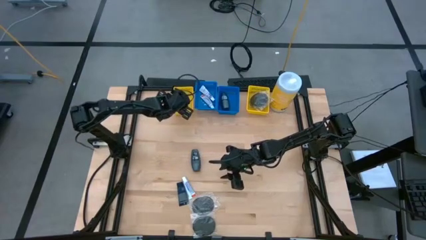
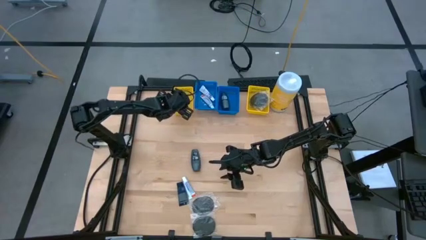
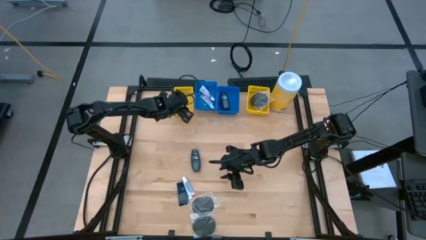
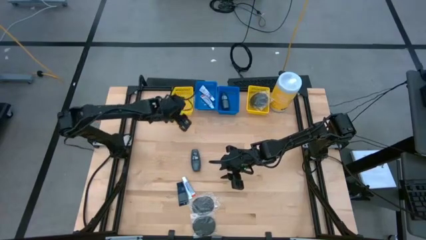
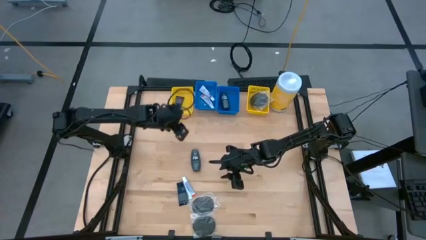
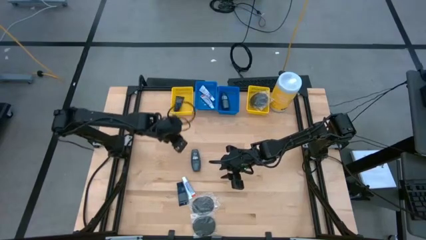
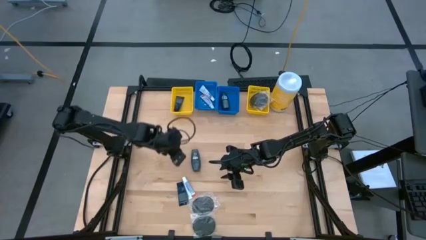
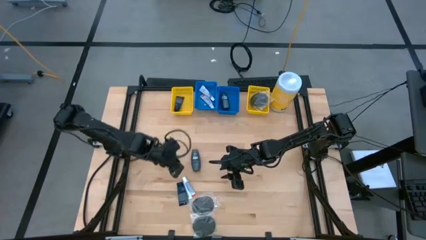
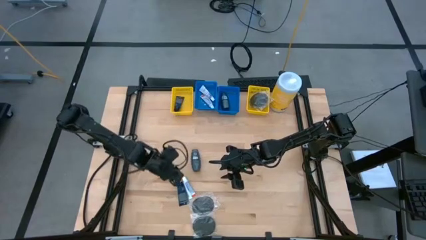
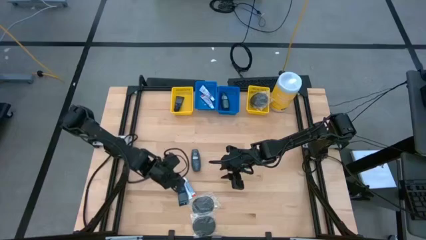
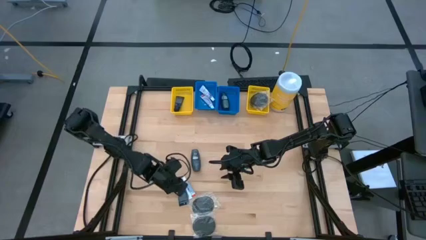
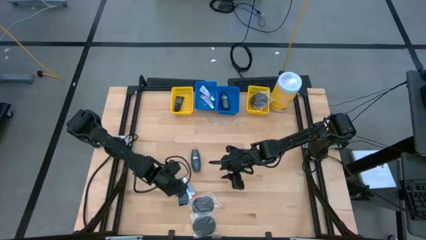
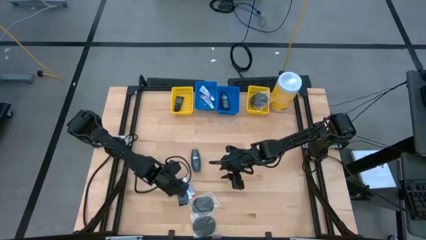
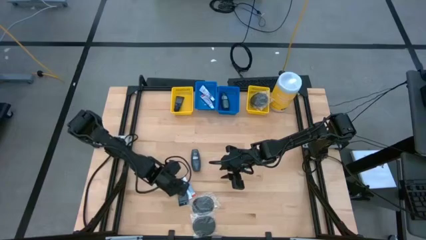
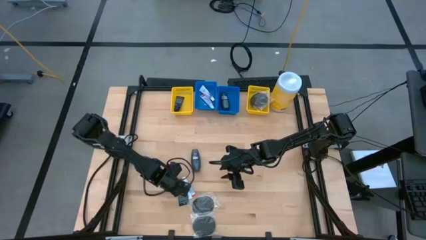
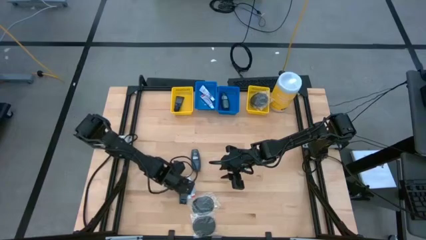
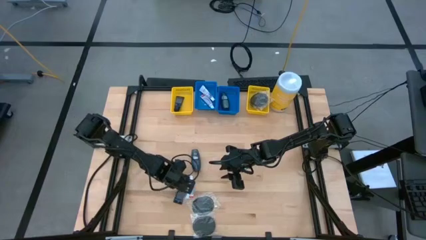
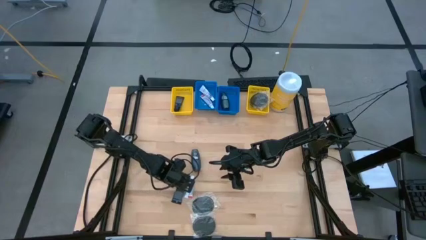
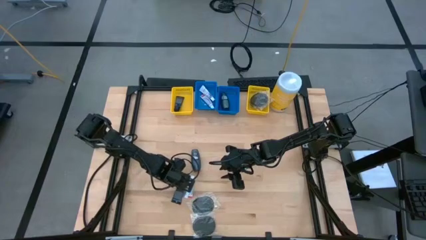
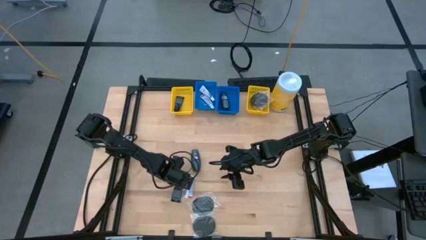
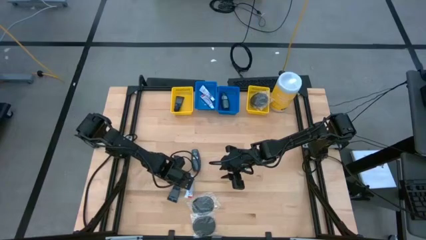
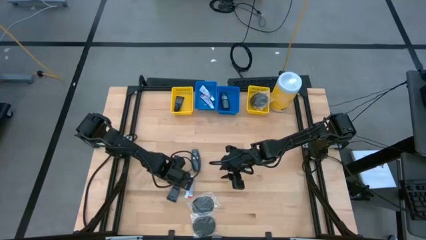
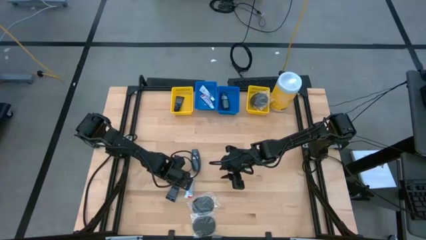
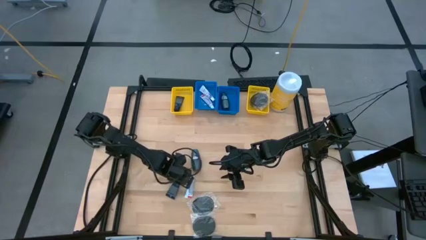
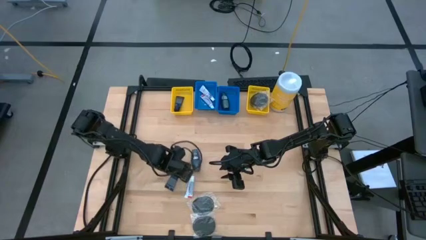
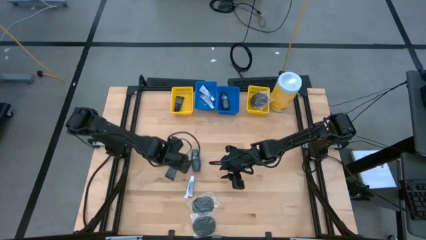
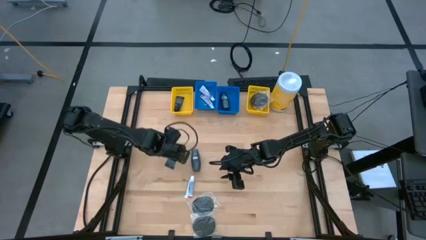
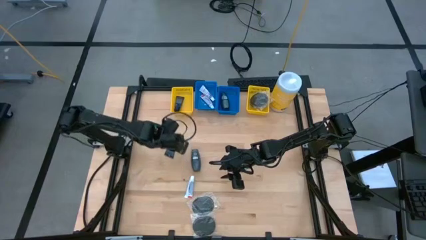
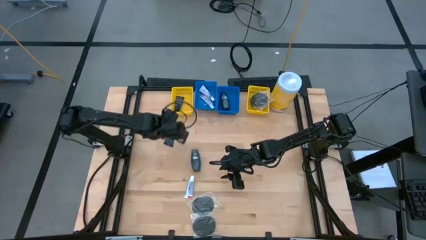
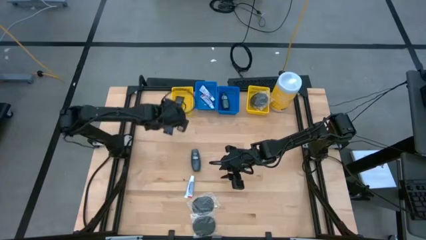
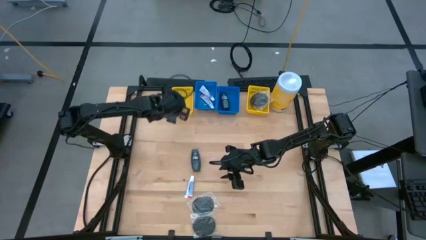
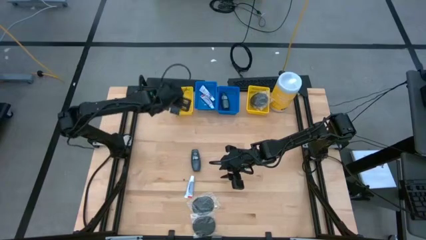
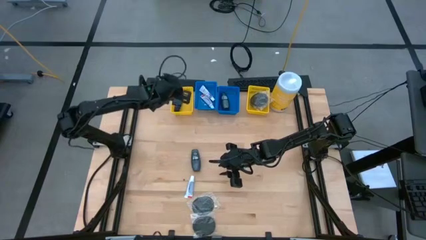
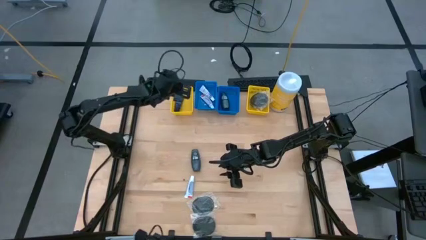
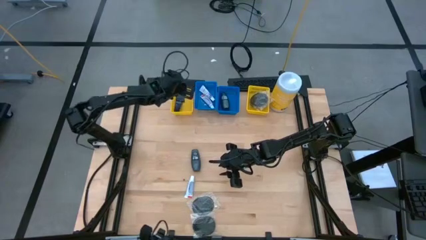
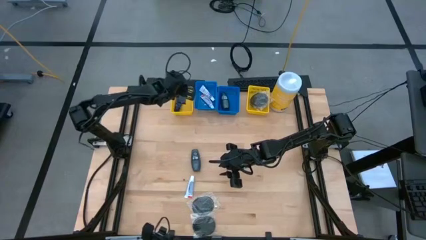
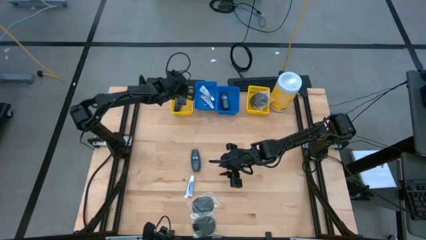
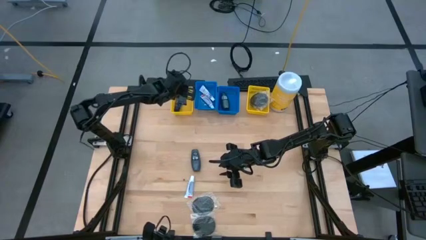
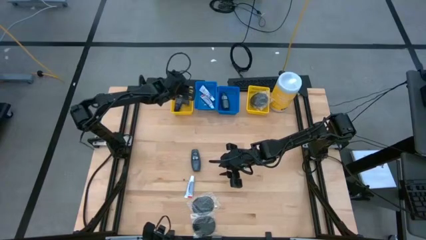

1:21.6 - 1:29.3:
Task: Pick & Place Travel size toiletries
Put the blue shave cream into the left yellow bin

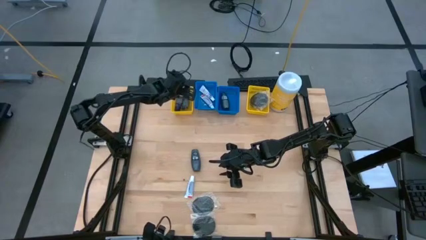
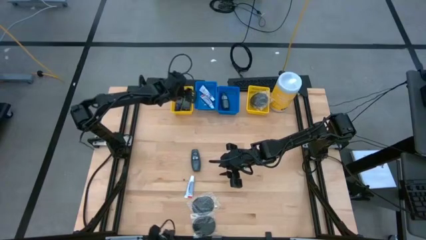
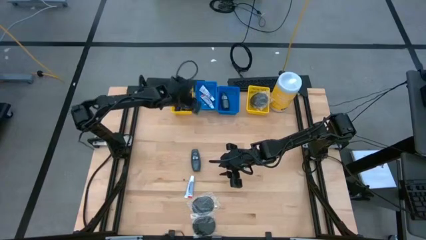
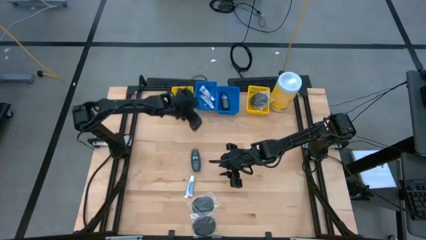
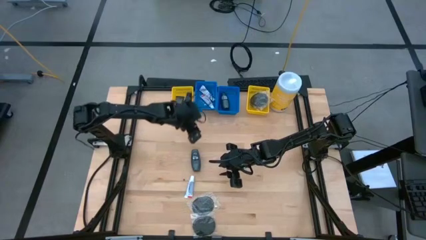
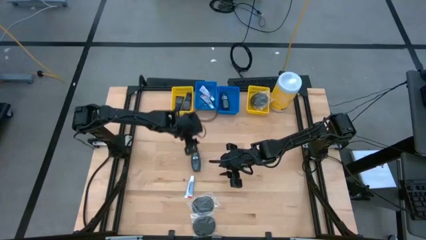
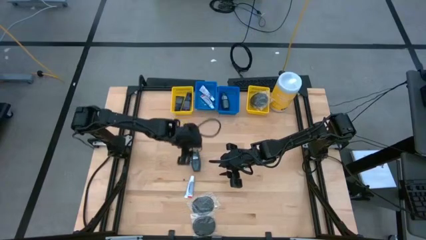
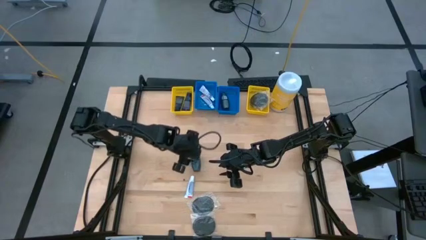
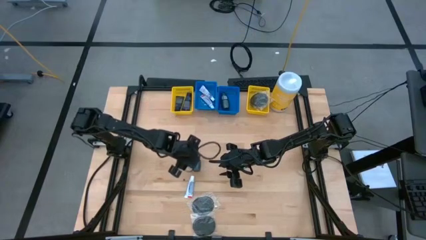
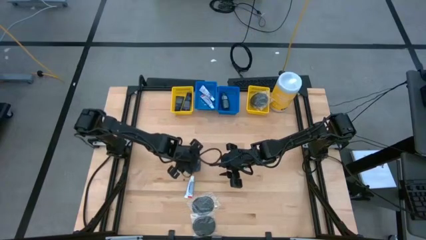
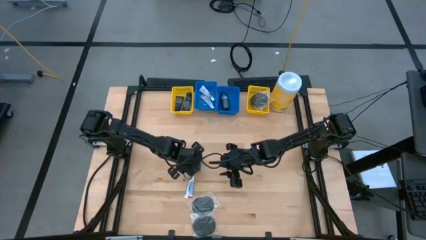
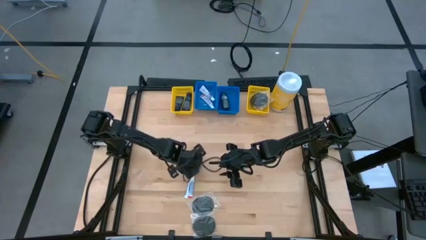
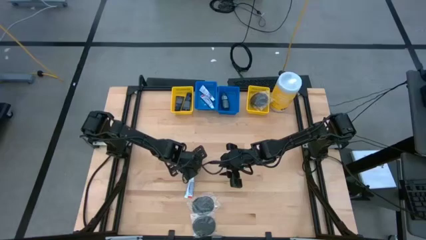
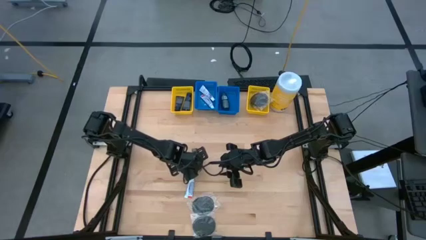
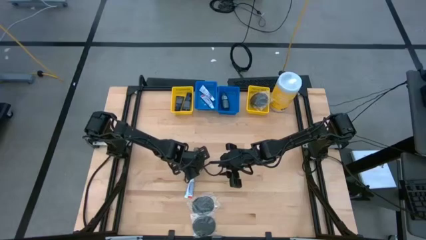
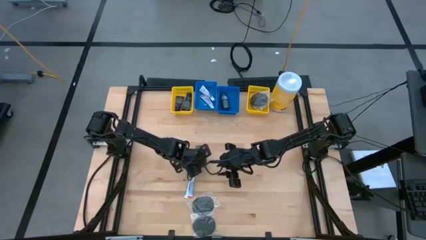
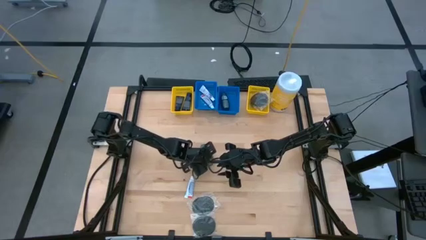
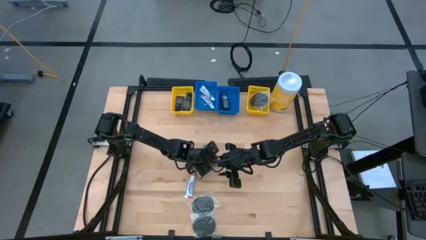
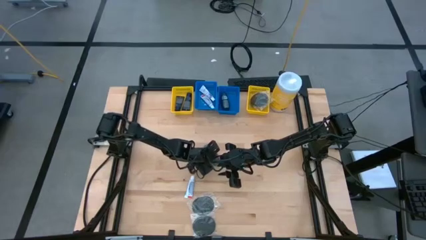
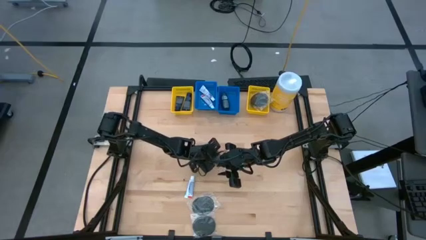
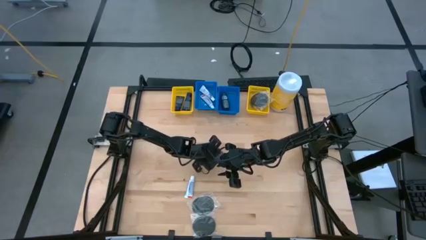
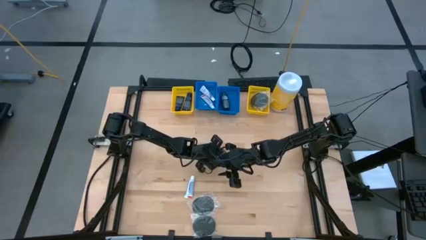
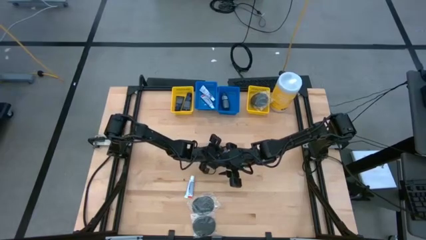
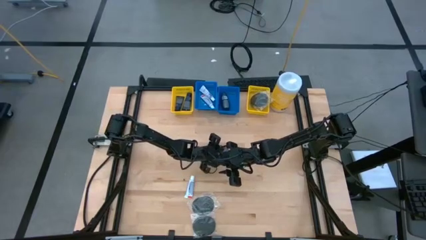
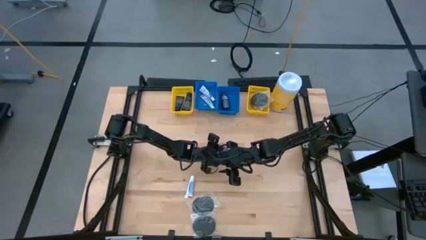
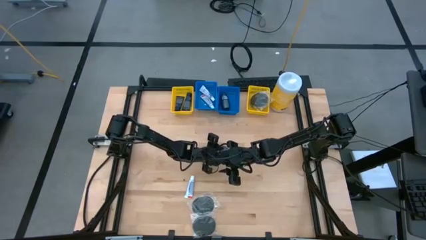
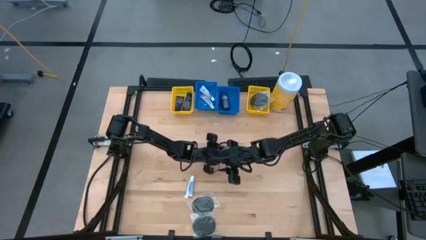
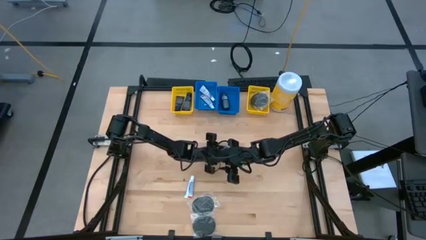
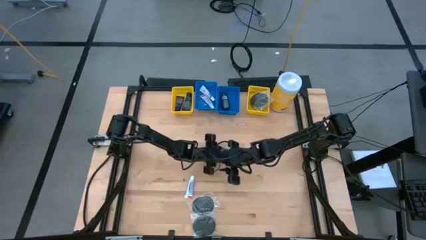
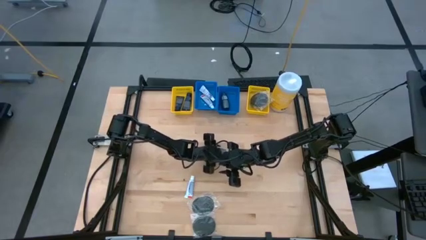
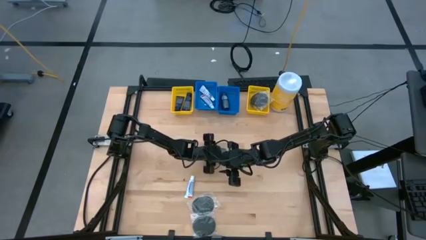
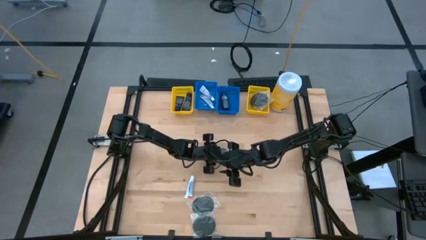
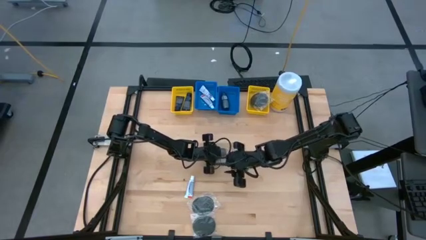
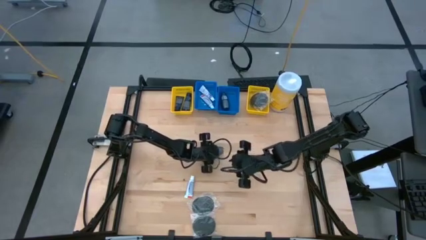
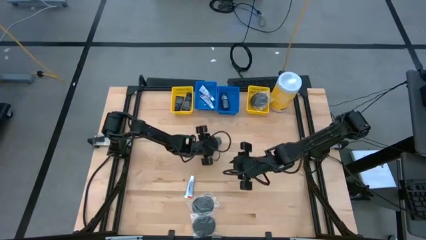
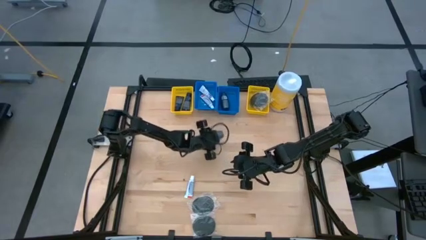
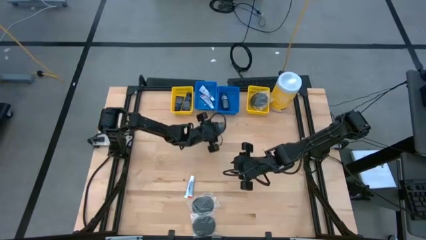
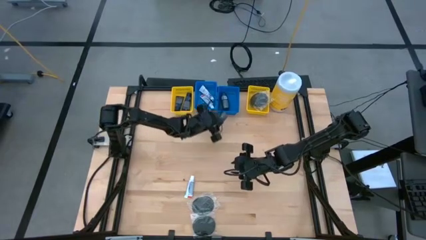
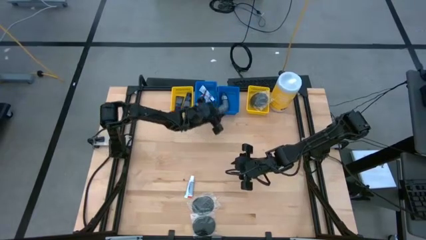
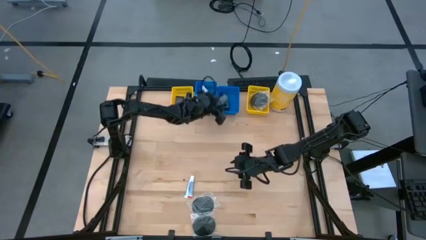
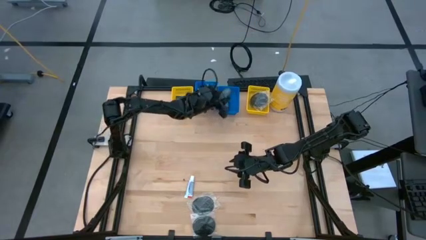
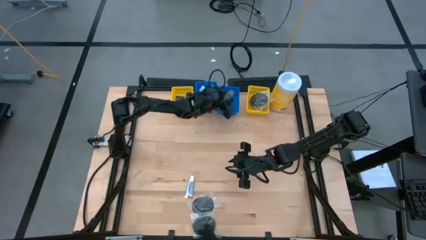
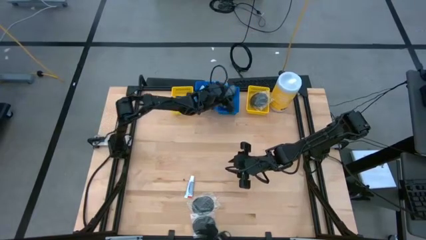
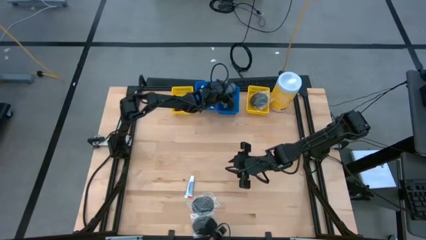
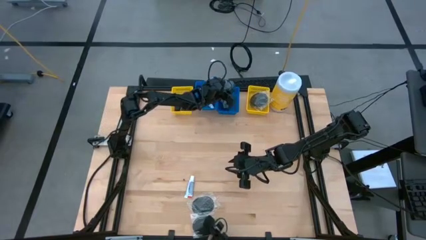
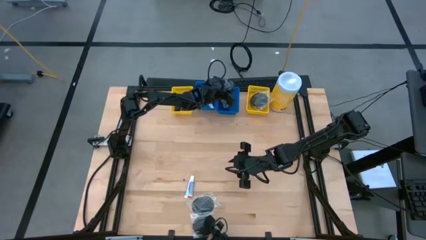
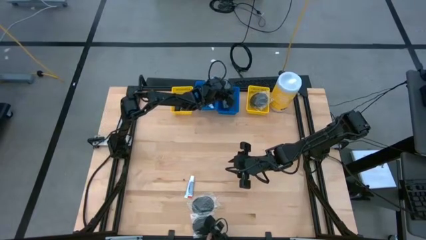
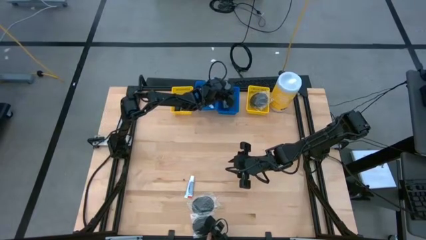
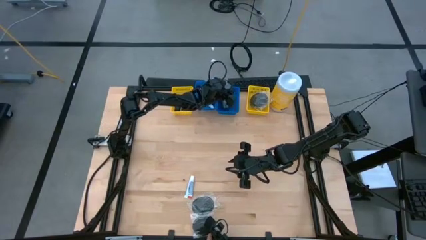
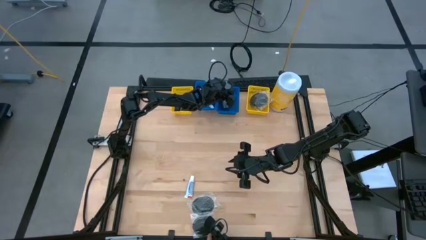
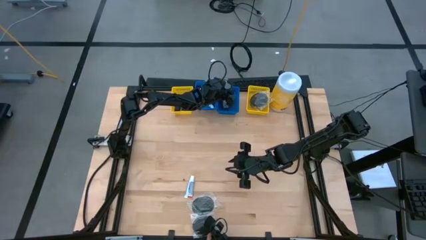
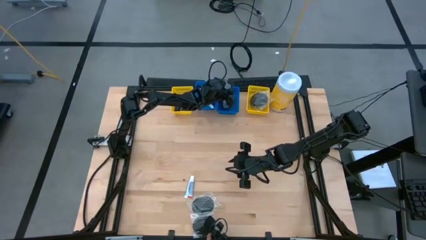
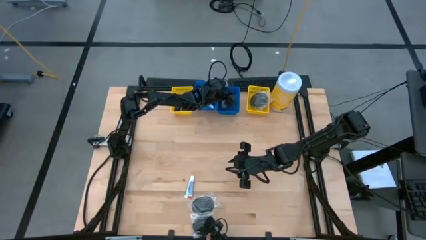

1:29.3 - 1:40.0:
Put the black deodorant into the right blue bin
